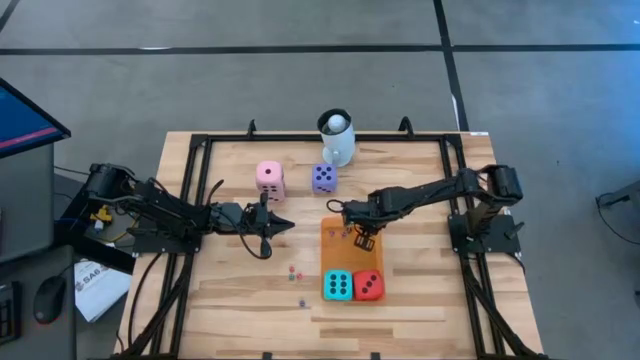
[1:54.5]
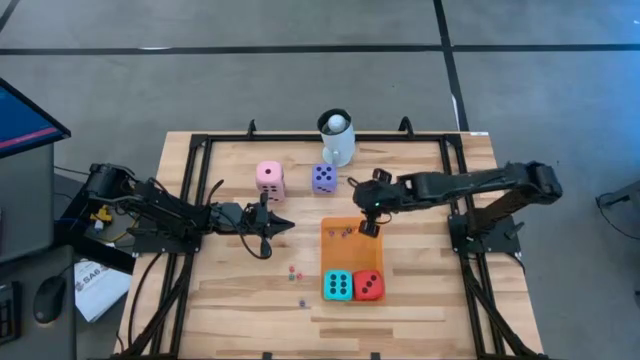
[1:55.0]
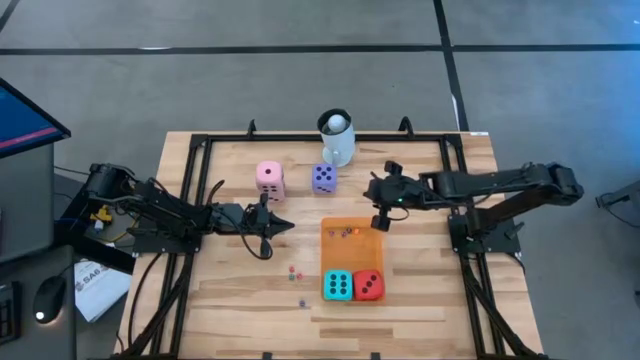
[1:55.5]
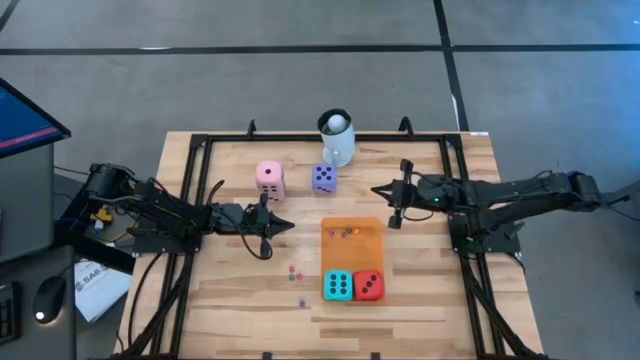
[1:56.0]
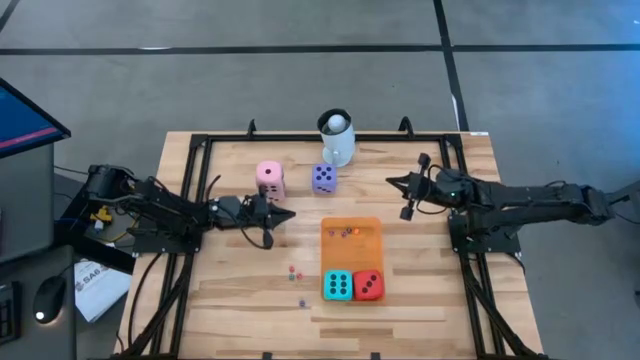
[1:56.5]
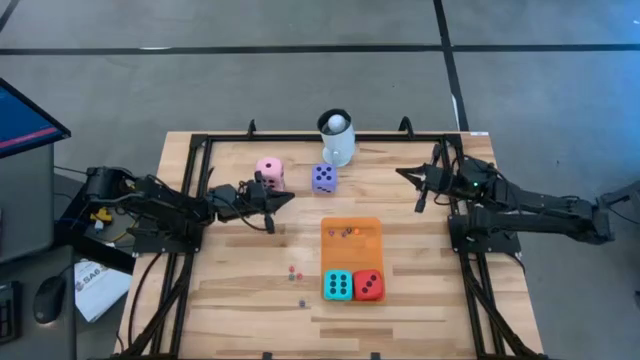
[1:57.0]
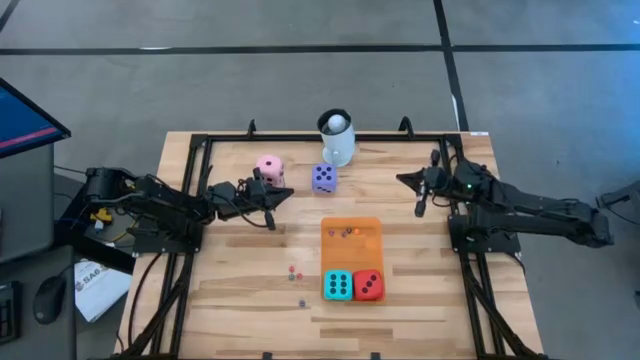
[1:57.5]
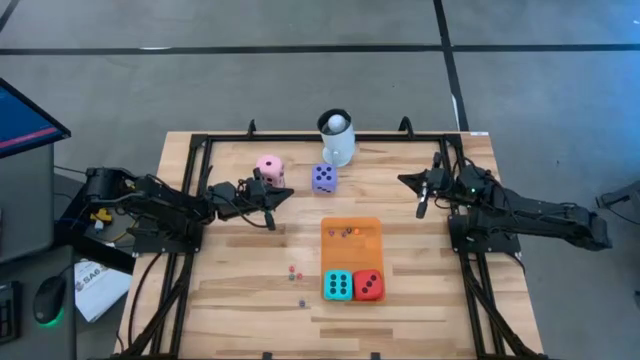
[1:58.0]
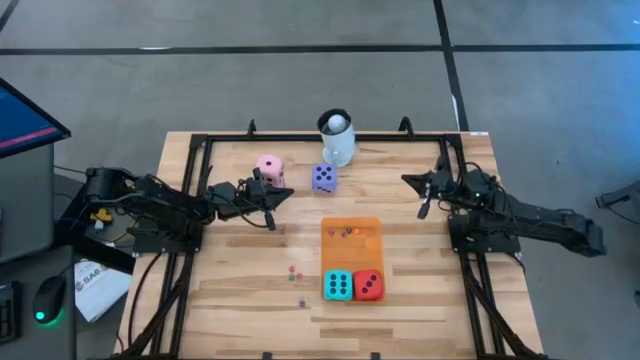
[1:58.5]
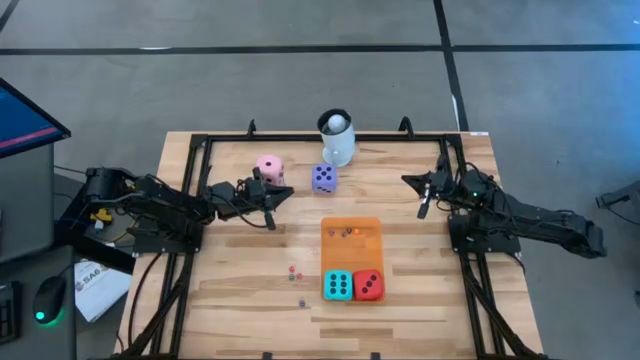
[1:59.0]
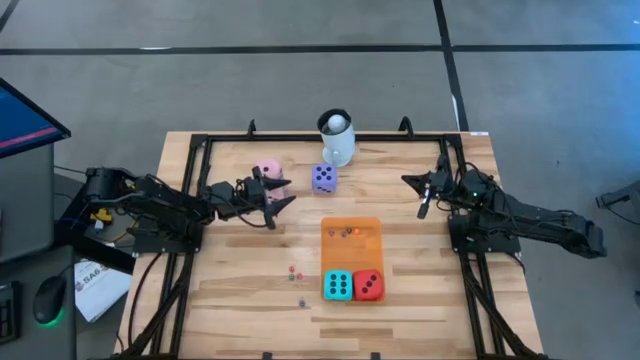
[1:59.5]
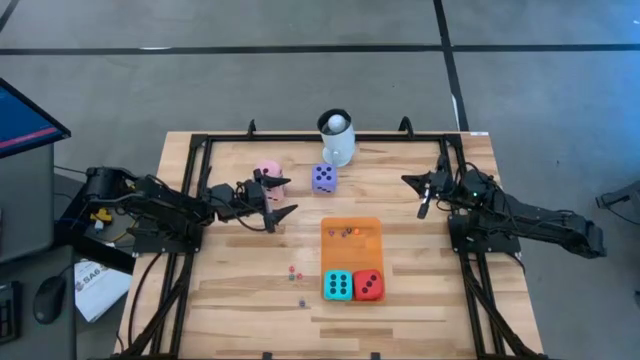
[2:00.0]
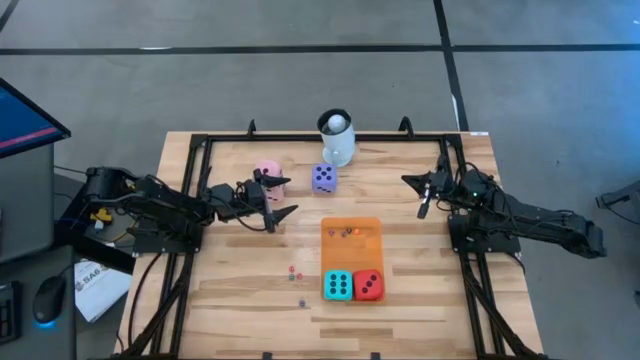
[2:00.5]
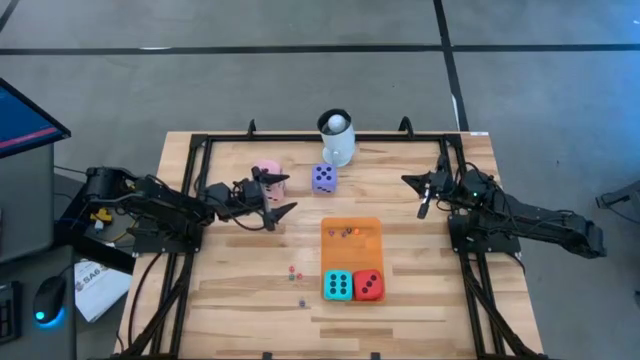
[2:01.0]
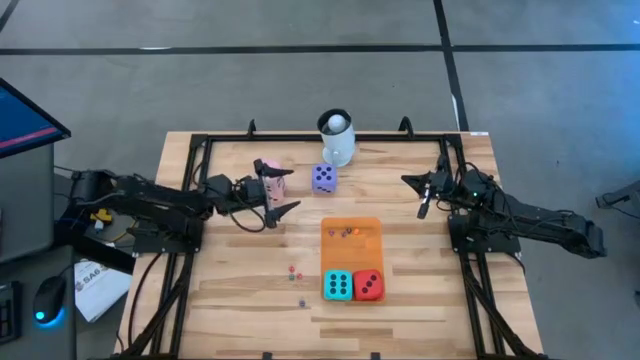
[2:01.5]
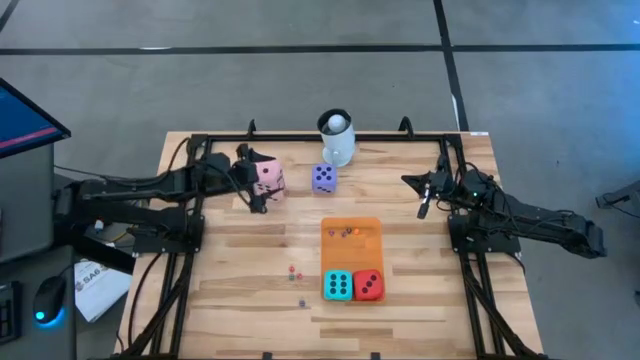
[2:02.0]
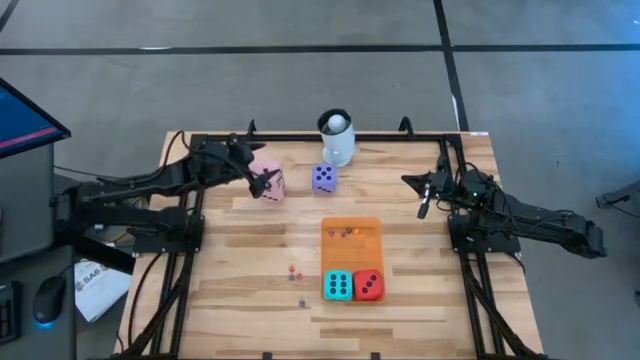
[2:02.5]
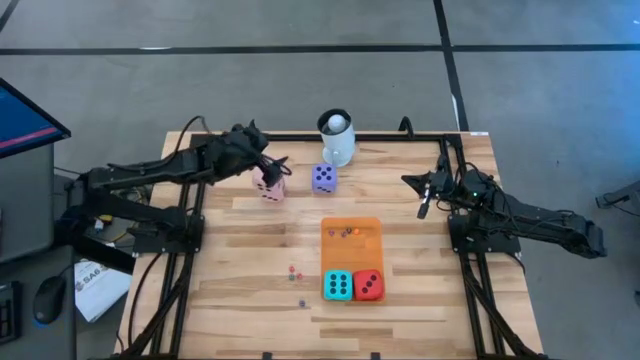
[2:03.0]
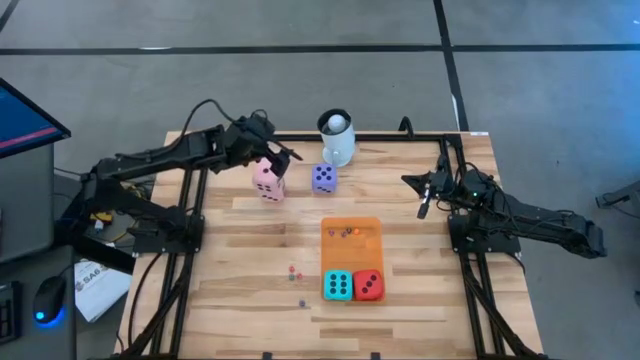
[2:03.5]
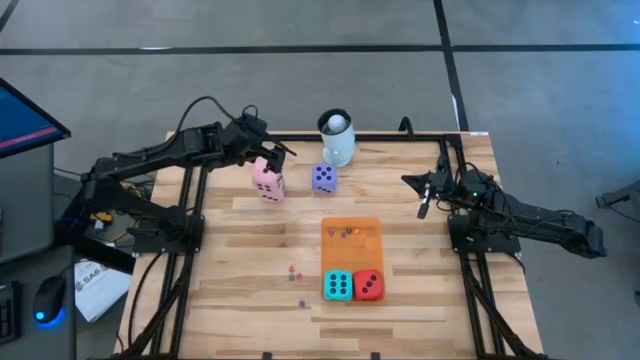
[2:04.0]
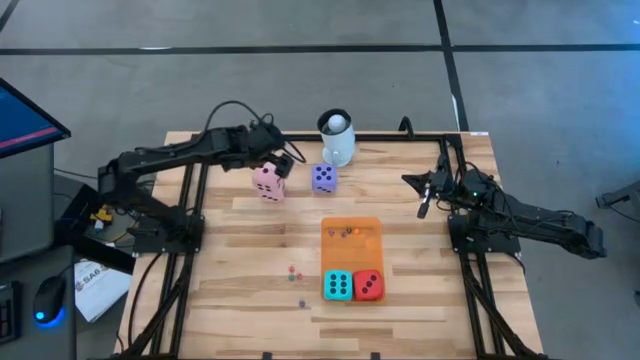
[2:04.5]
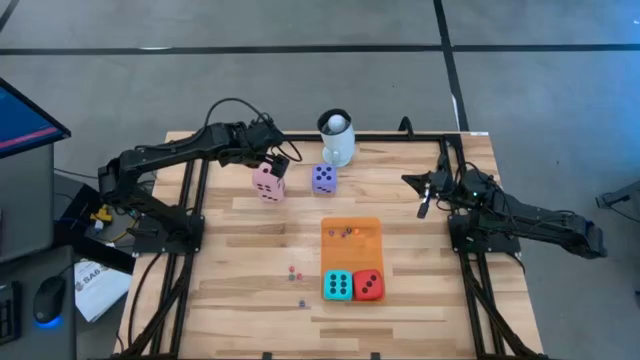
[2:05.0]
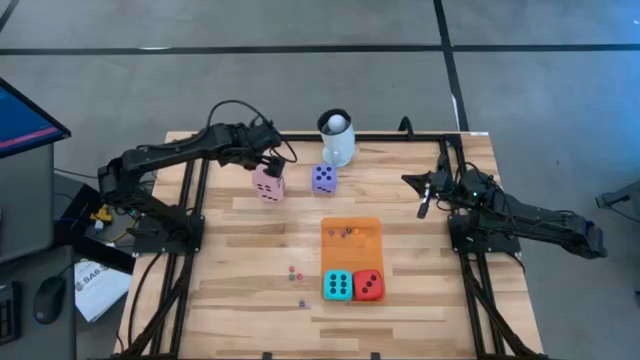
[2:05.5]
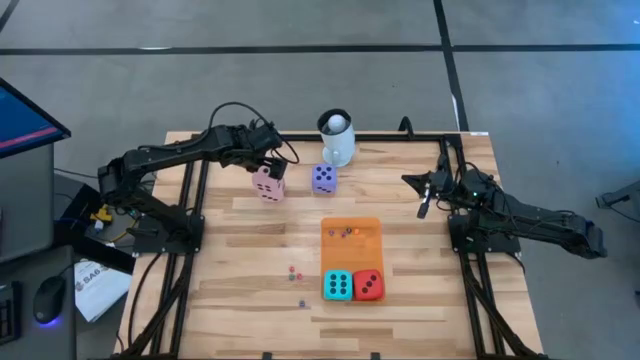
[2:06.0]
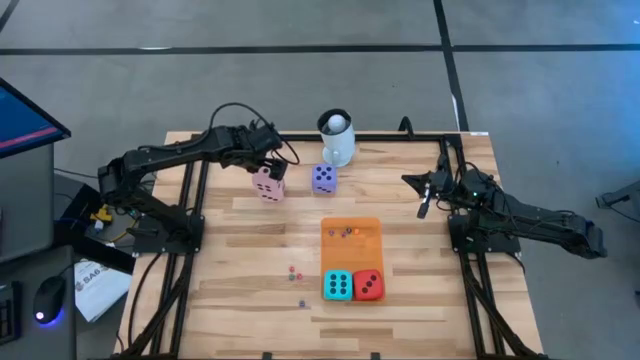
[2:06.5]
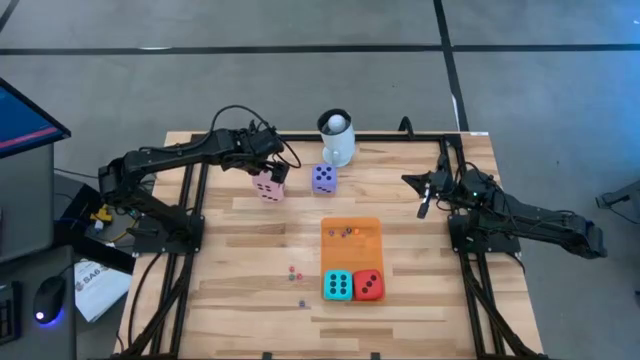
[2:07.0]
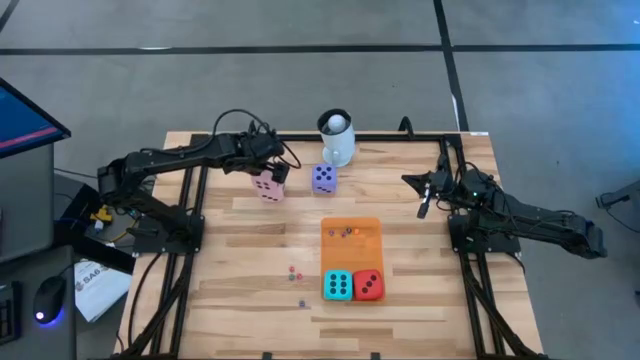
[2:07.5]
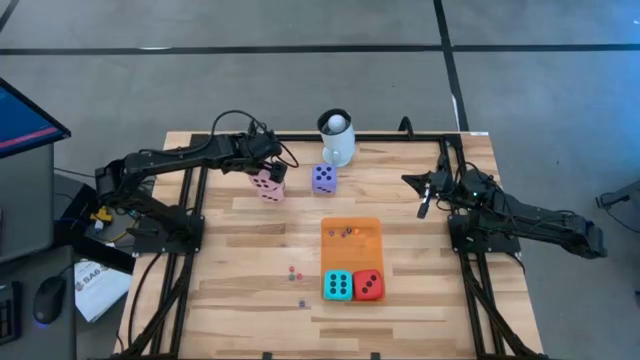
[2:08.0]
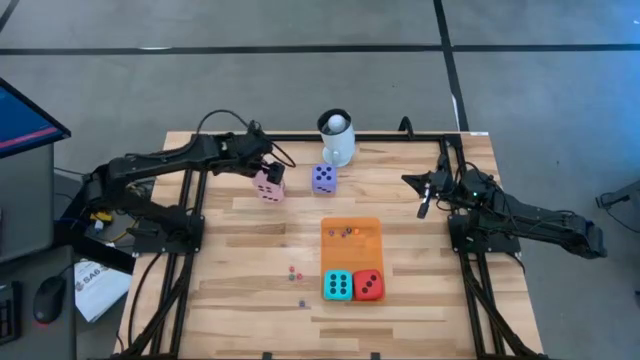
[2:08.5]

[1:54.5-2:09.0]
Task: Pick & Place Dice
Put the top large pink dice into the orange bin

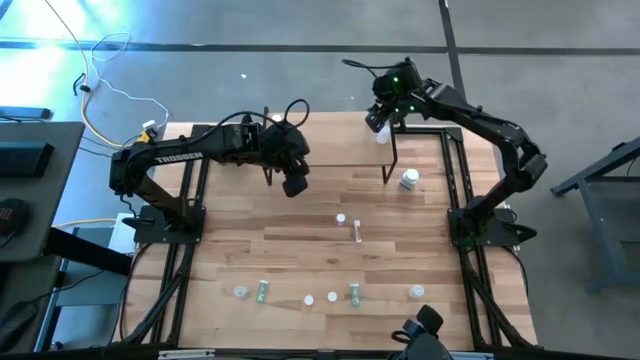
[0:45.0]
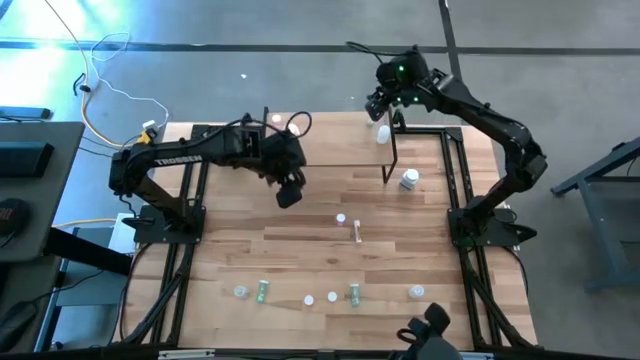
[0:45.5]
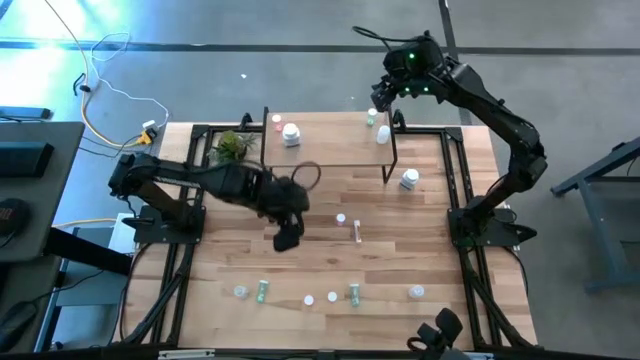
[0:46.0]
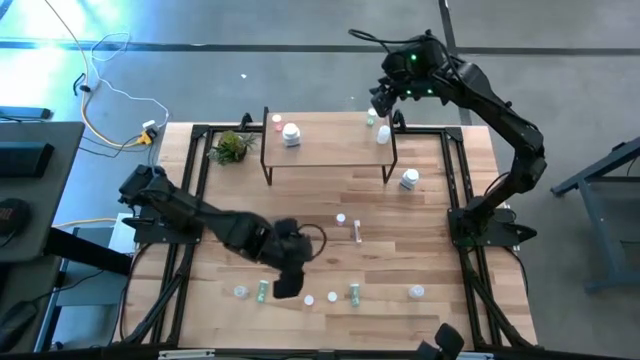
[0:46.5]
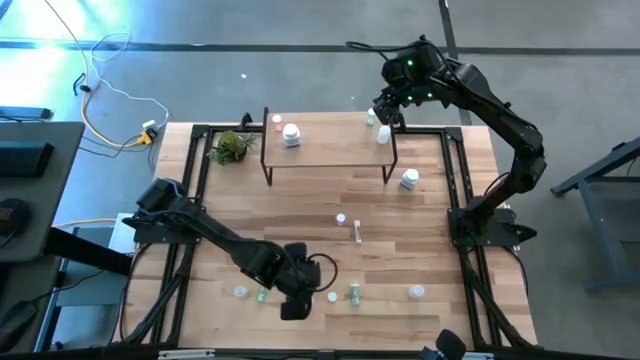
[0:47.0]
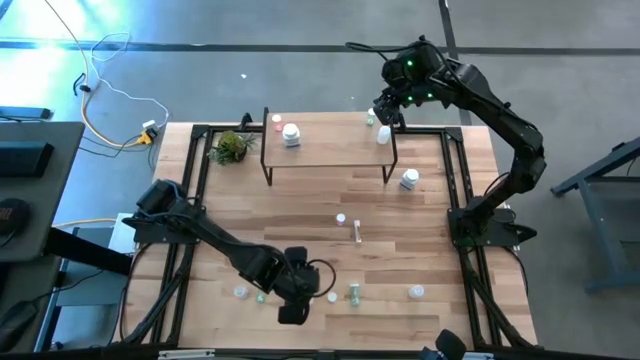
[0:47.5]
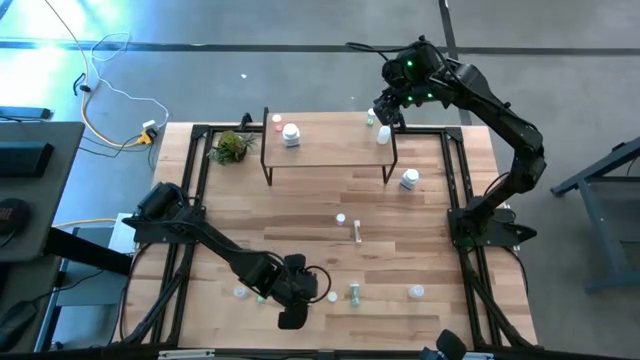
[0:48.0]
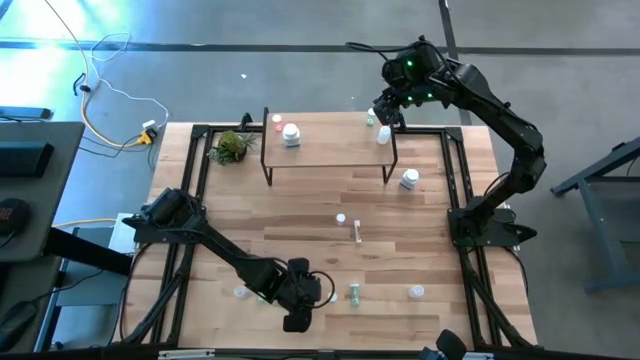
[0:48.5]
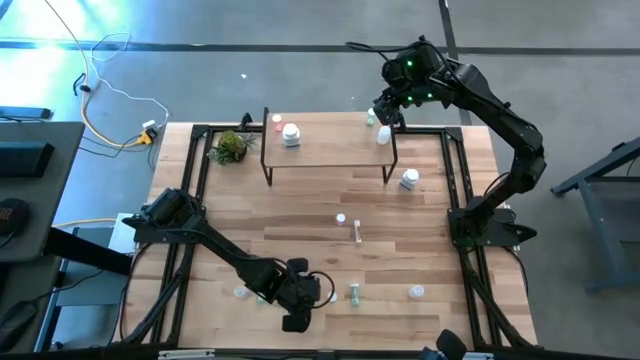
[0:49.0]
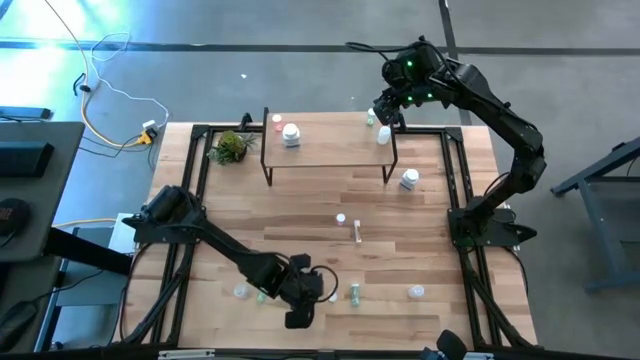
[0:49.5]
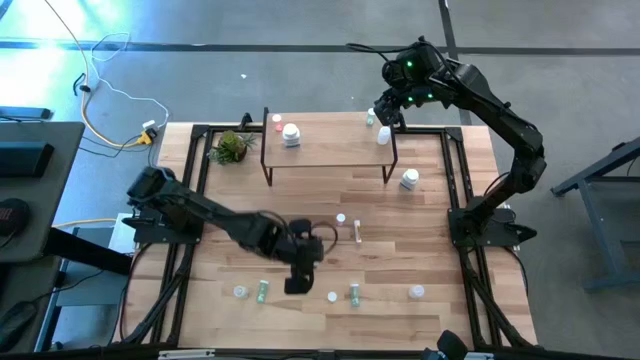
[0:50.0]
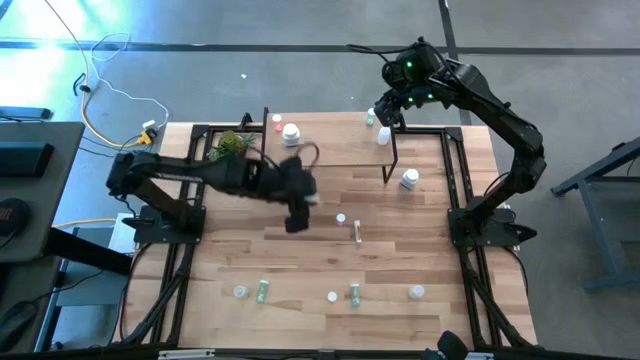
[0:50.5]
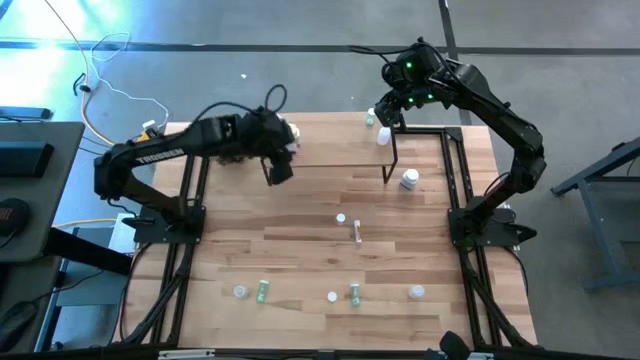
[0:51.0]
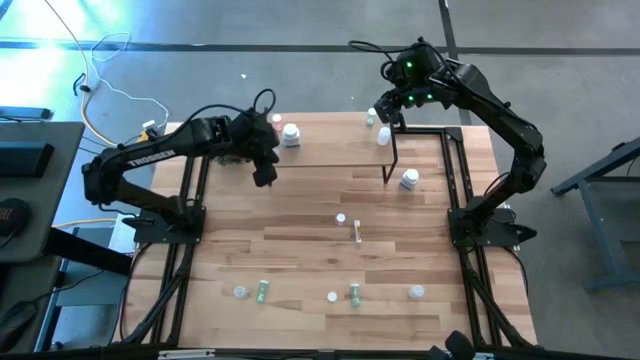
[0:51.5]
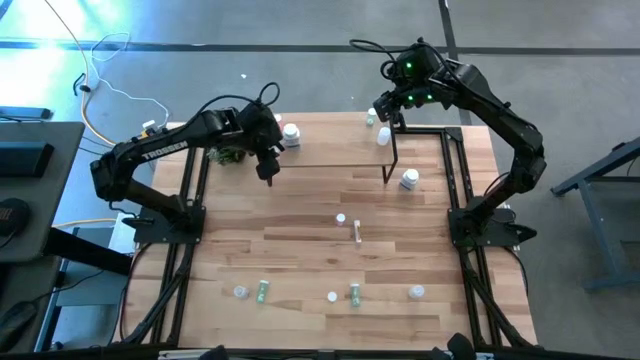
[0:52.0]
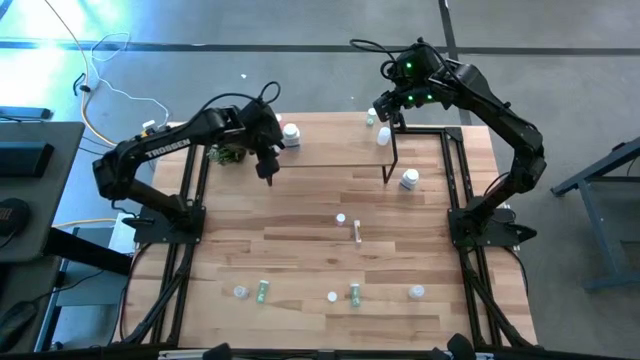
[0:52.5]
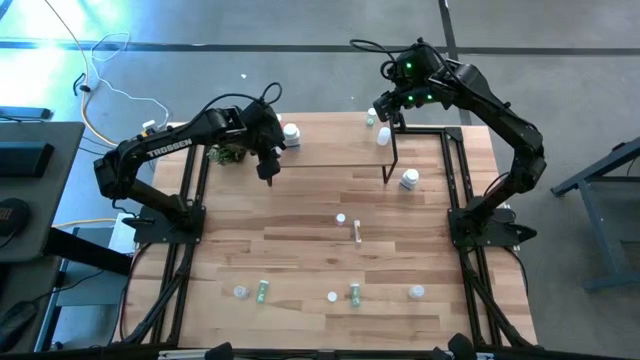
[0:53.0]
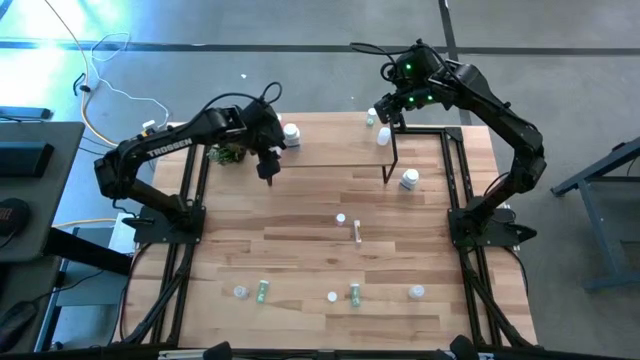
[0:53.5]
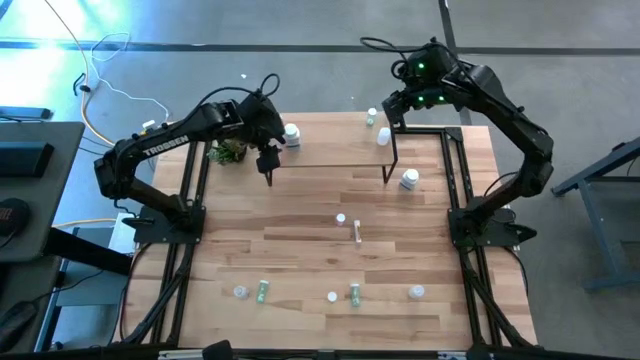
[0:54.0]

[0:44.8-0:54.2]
Task: Pick and place medicine bottles onto shelf by color
Put the orange pill bottle on the shelf
